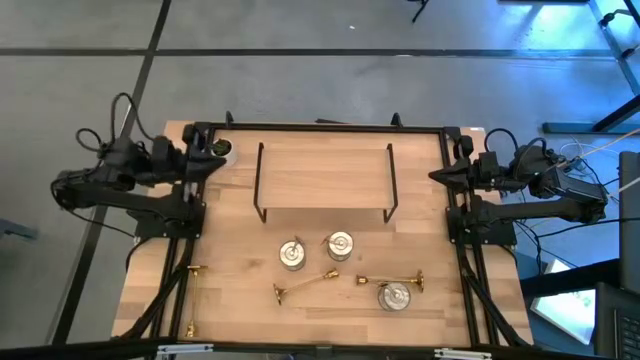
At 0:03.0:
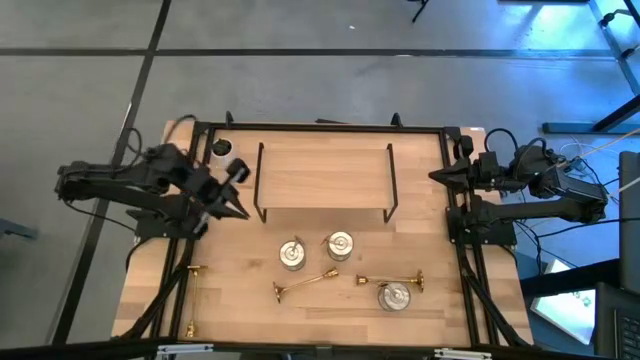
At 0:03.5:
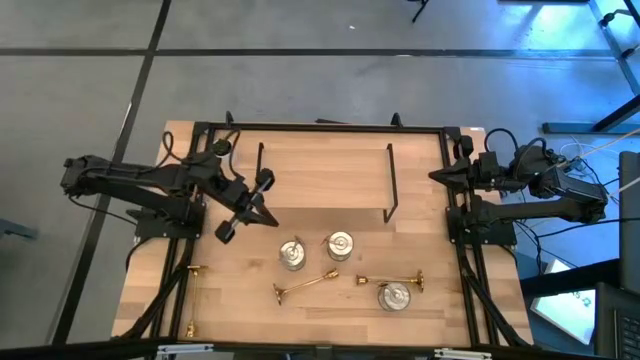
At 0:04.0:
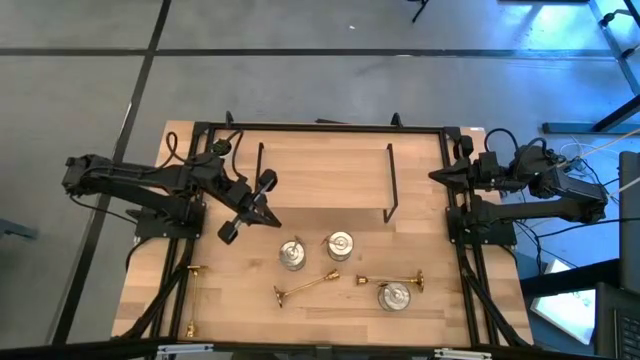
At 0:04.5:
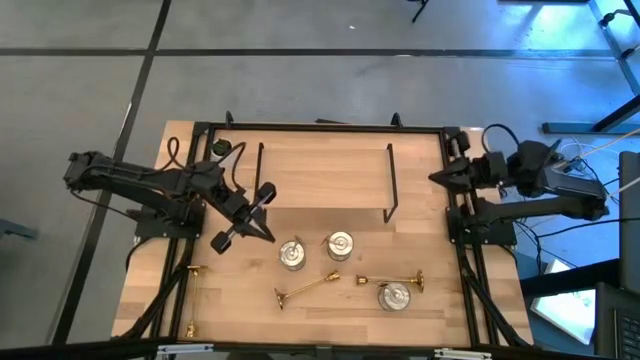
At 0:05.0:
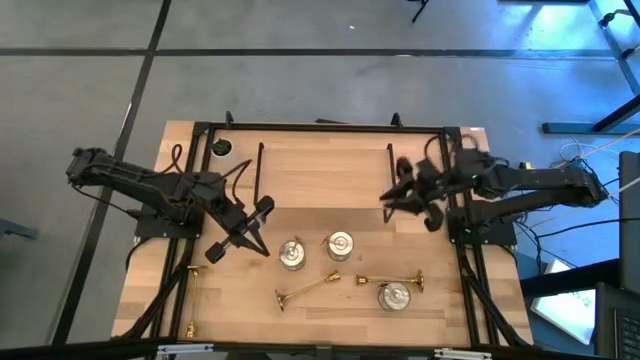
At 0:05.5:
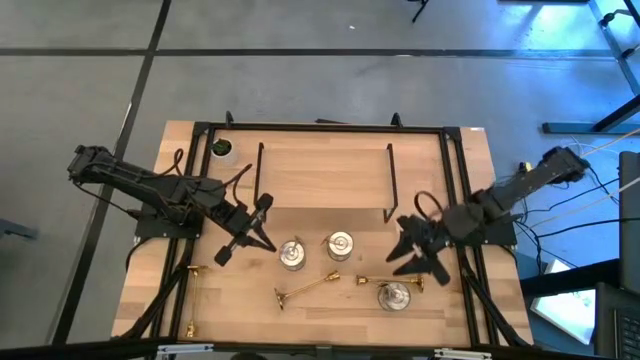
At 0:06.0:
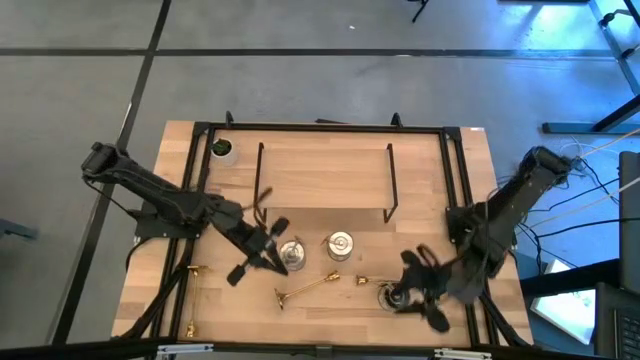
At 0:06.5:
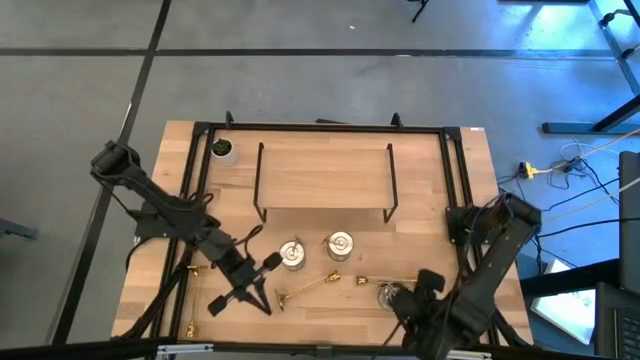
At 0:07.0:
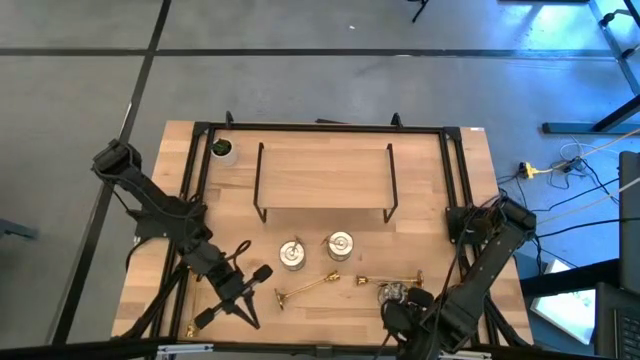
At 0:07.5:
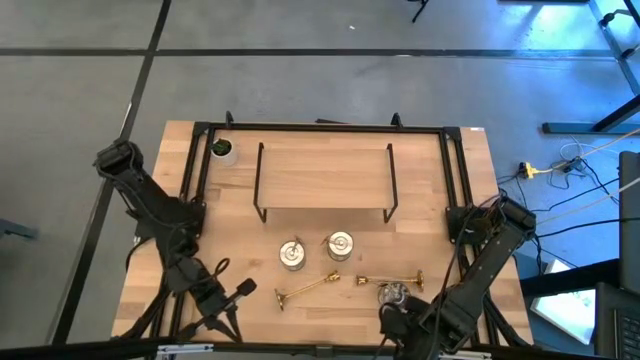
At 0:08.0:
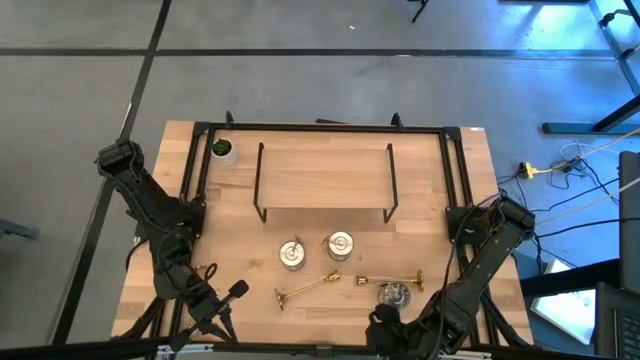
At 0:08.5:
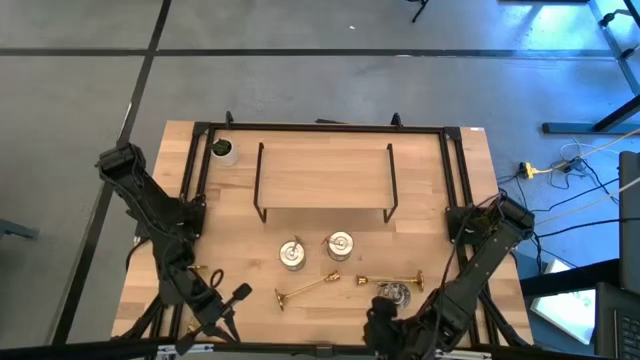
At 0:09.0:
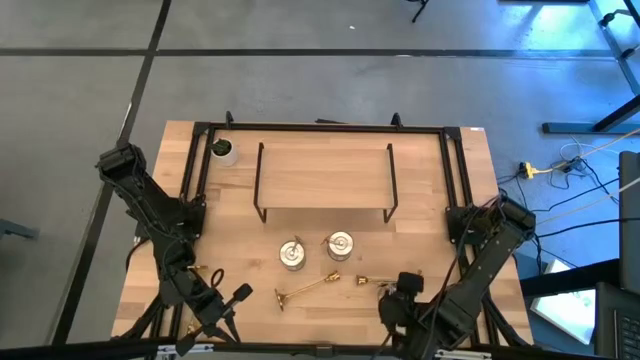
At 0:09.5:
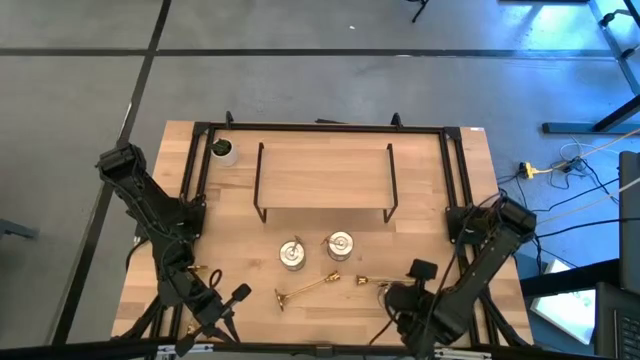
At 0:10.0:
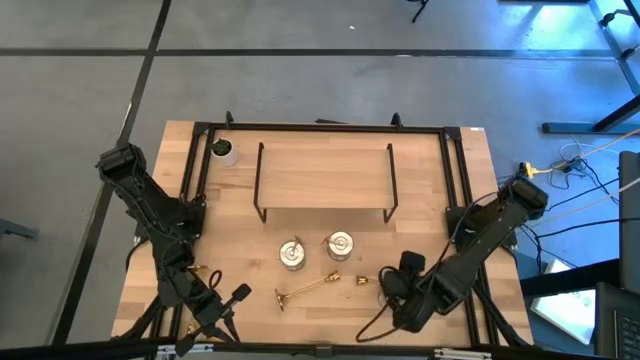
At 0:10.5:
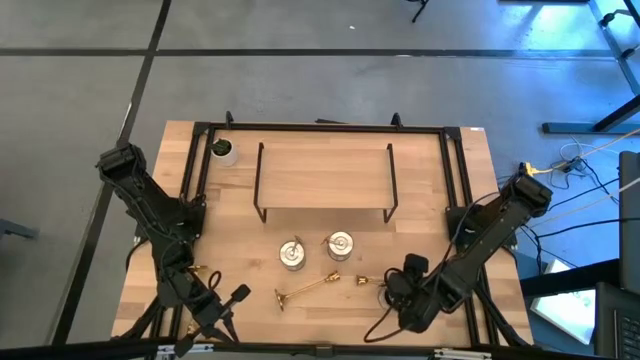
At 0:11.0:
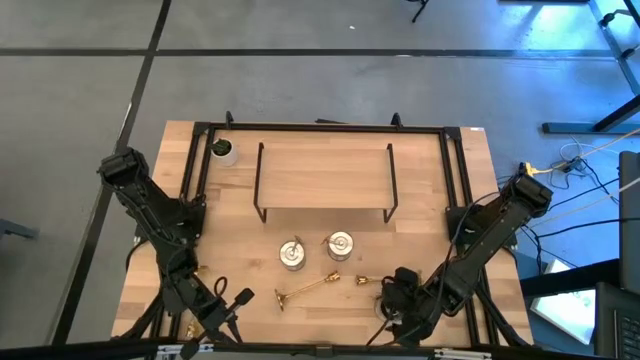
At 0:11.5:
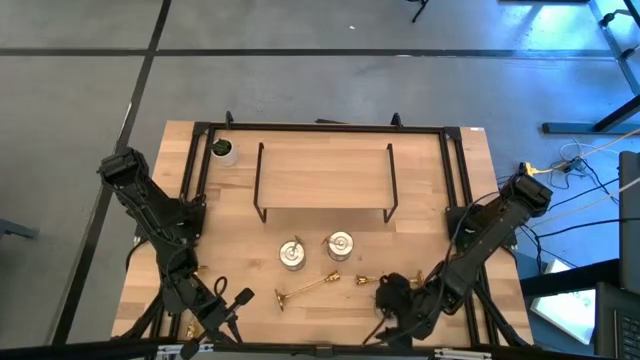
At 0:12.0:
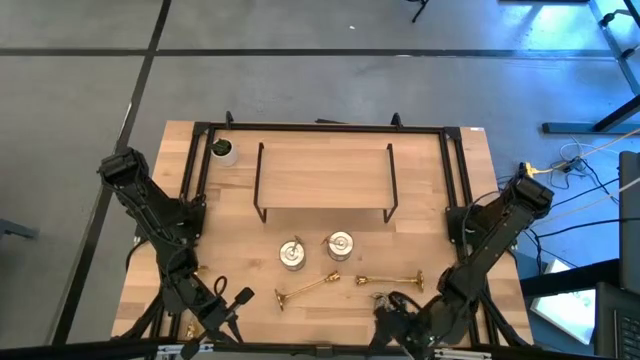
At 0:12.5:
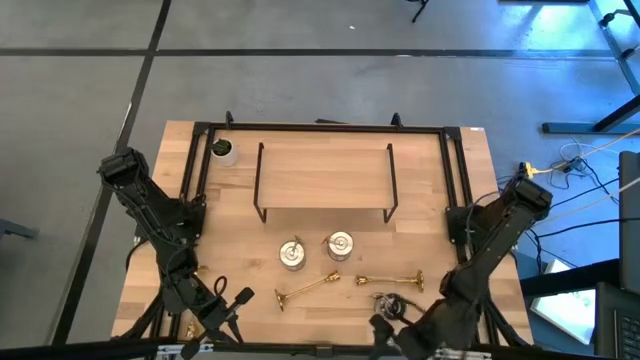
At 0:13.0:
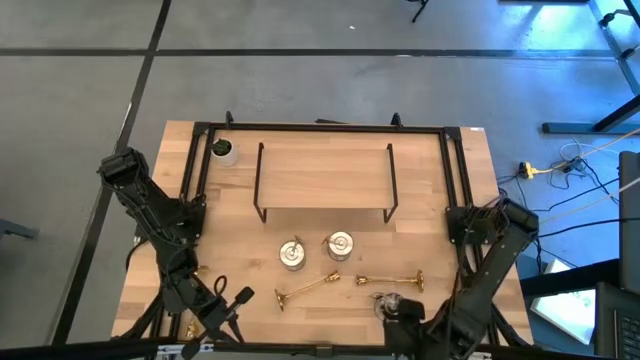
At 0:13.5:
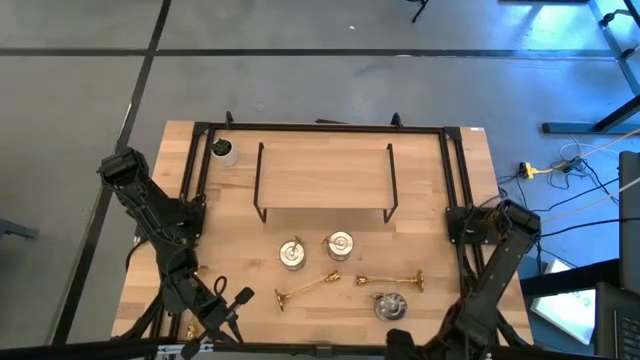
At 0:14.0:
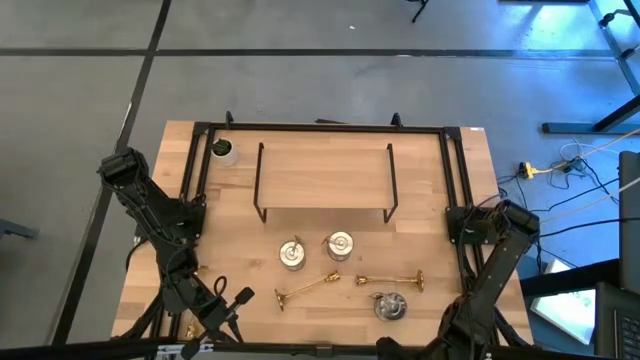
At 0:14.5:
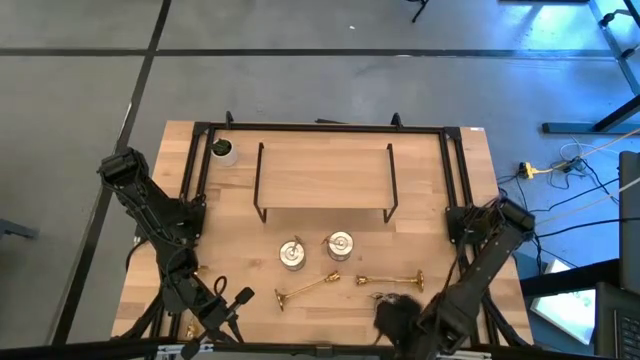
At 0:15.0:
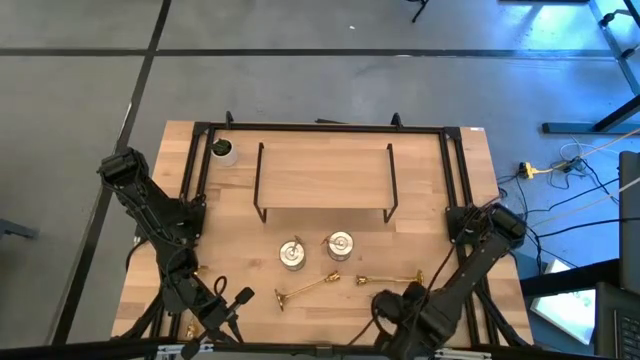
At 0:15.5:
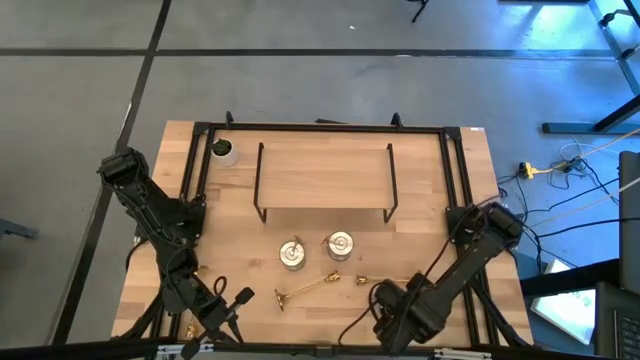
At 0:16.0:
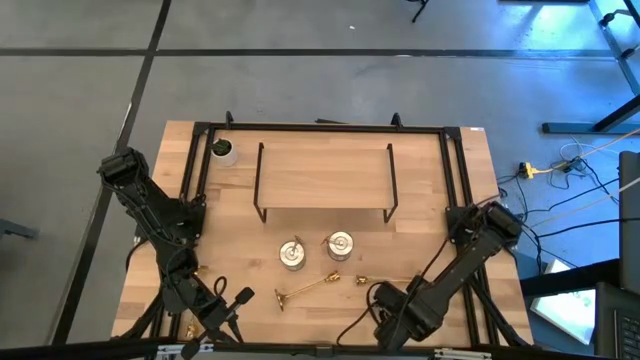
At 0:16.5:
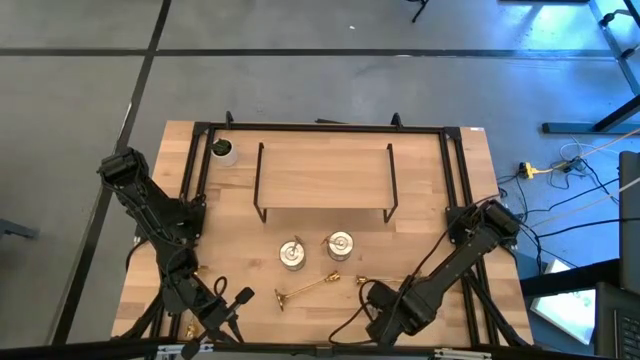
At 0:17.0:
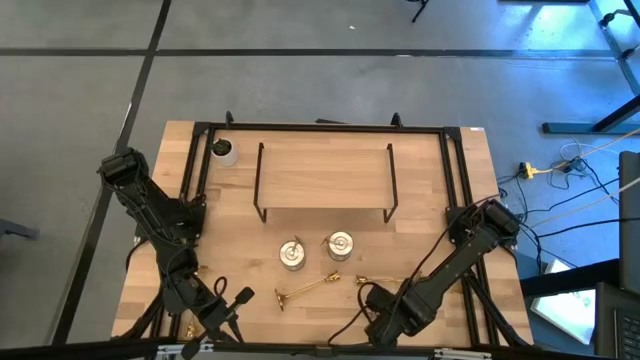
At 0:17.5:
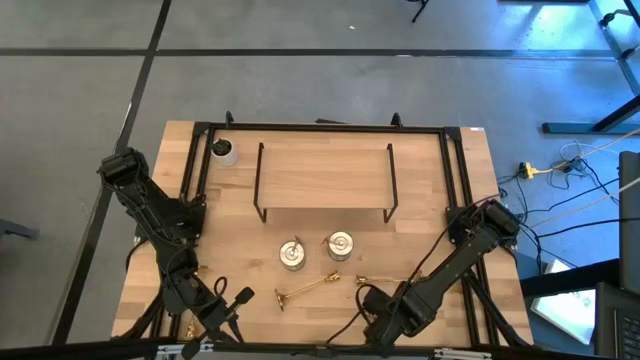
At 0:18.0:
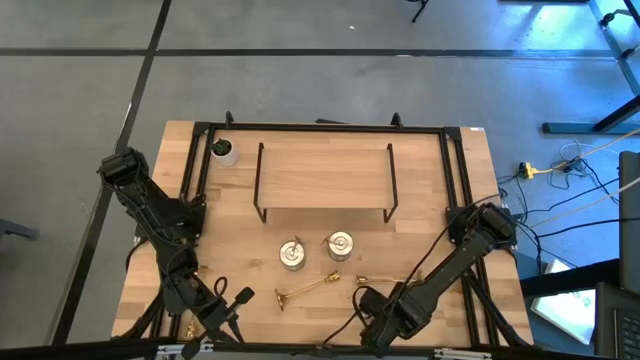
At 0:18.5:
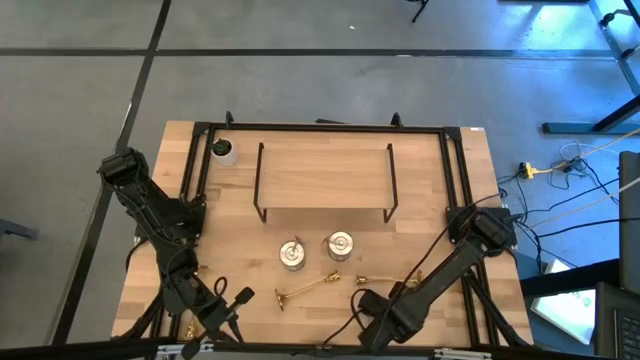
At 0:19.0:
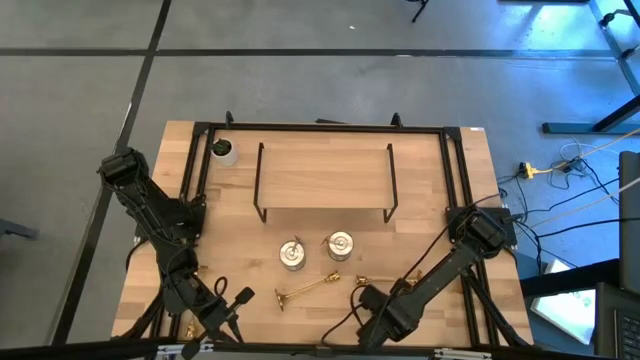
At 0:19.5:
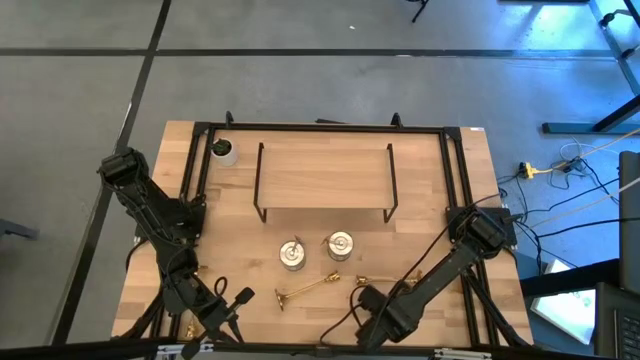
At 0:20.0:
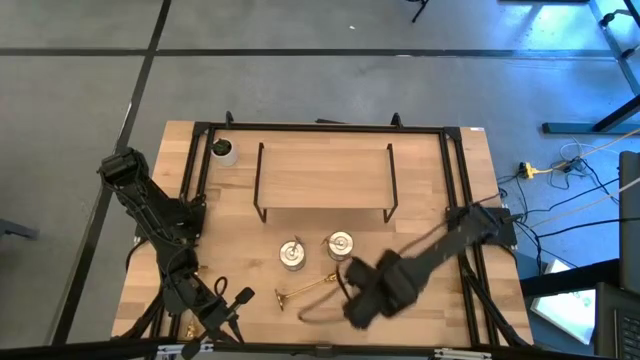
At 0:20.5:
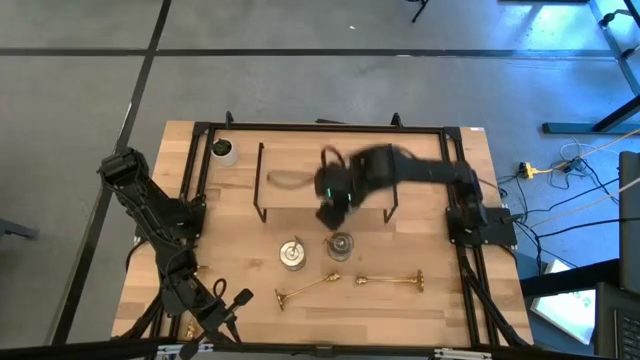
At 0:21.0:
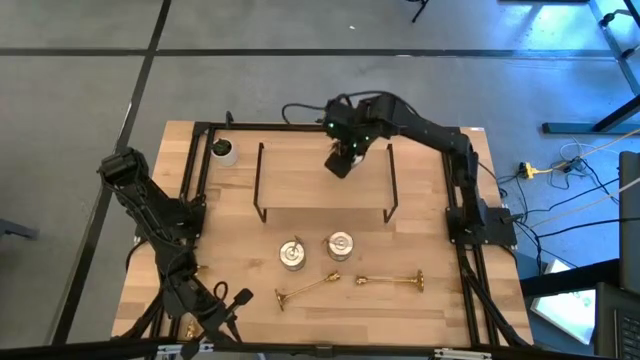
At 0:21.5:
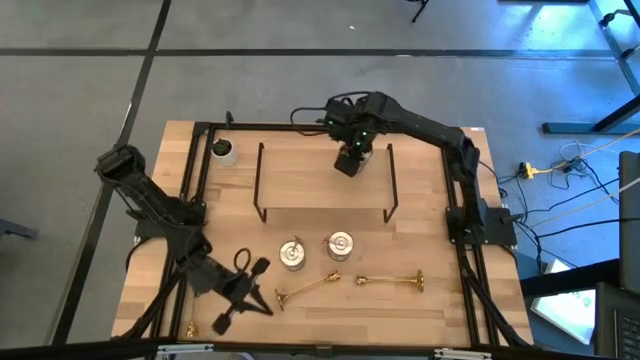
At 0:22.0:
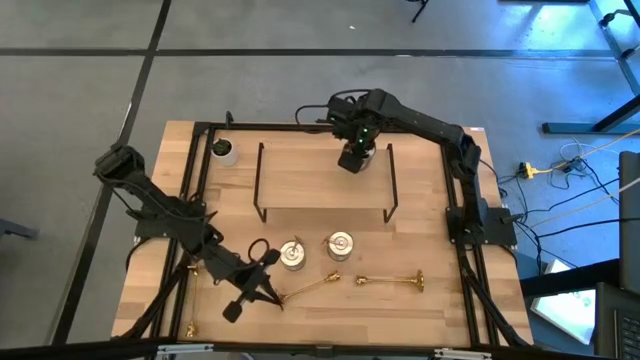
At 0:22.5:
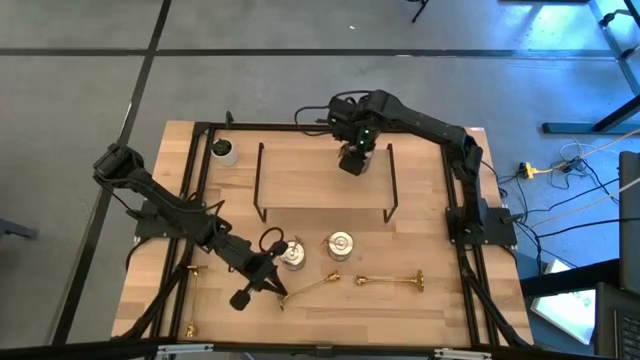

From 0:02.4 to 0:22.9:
Task: Pick & Place candle stick holders
Put the bottom right silver scented candle on the shelf
